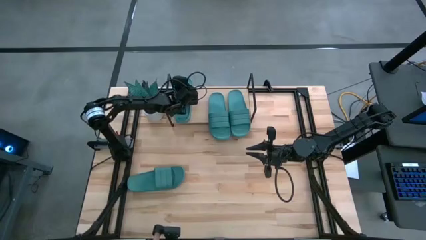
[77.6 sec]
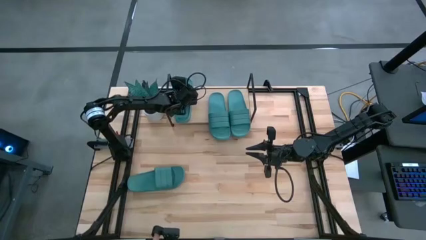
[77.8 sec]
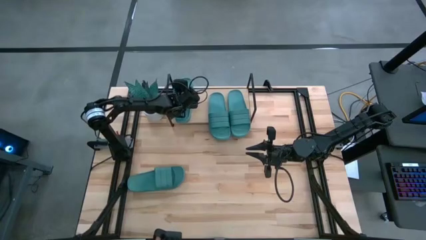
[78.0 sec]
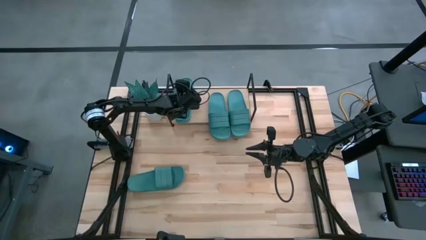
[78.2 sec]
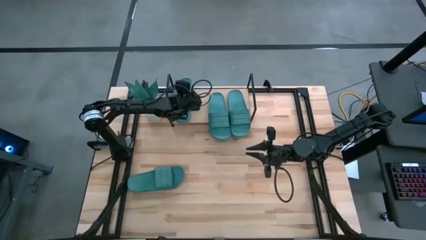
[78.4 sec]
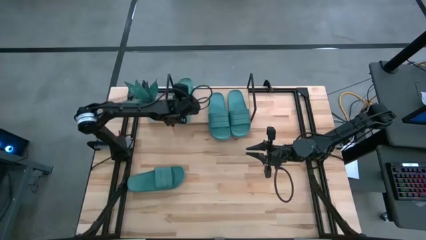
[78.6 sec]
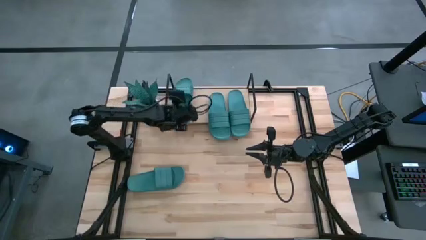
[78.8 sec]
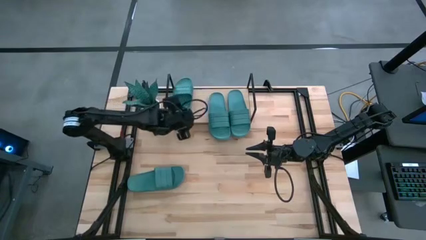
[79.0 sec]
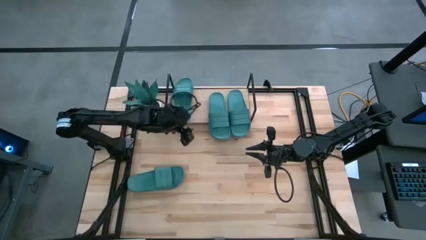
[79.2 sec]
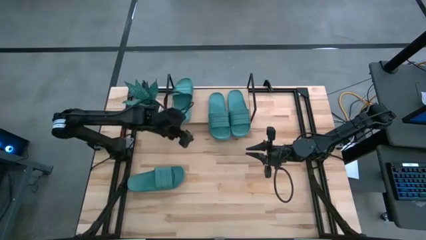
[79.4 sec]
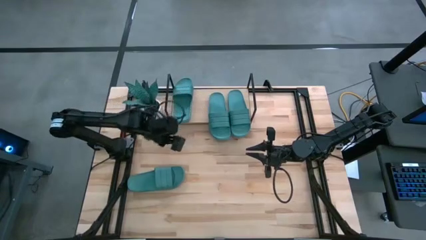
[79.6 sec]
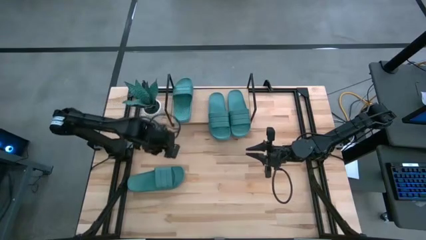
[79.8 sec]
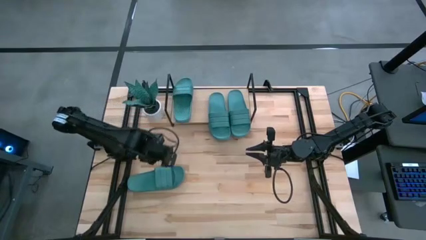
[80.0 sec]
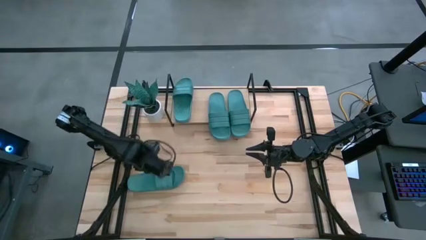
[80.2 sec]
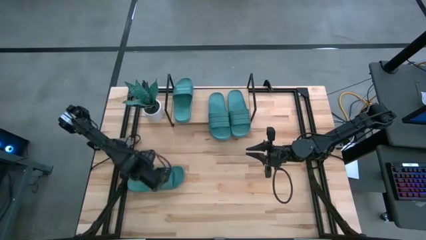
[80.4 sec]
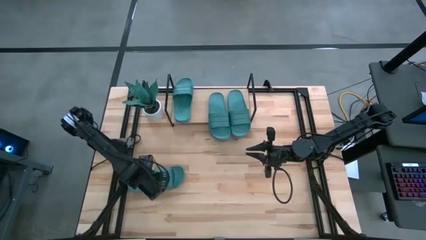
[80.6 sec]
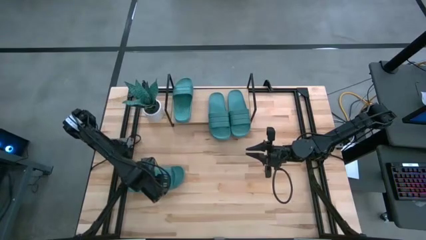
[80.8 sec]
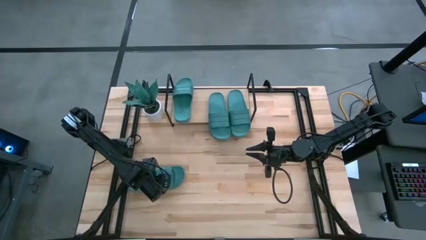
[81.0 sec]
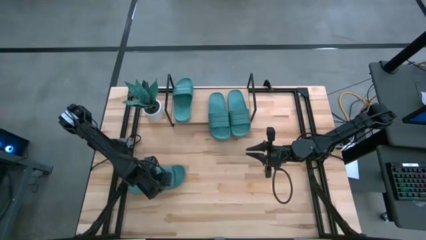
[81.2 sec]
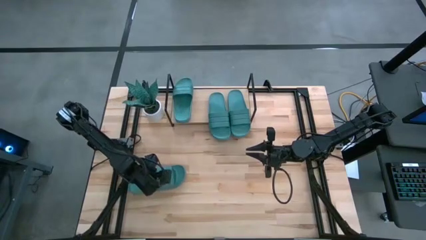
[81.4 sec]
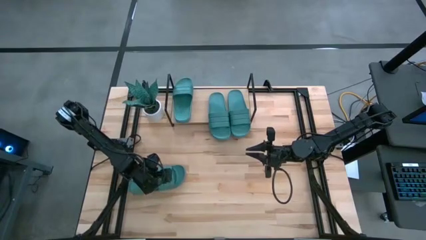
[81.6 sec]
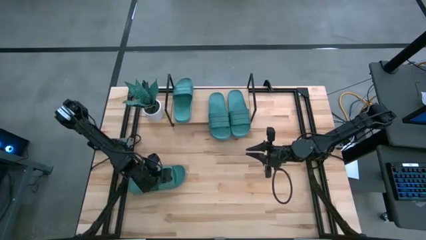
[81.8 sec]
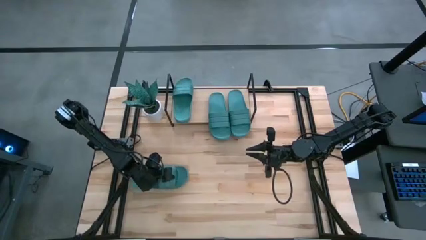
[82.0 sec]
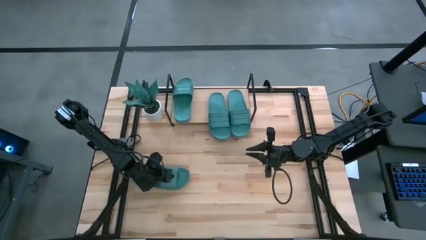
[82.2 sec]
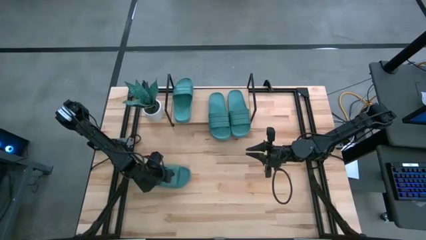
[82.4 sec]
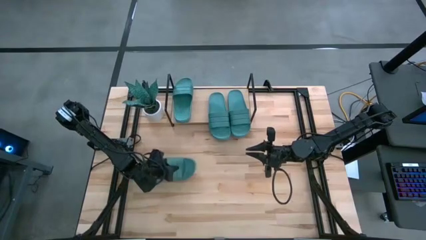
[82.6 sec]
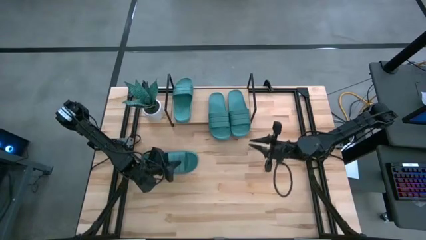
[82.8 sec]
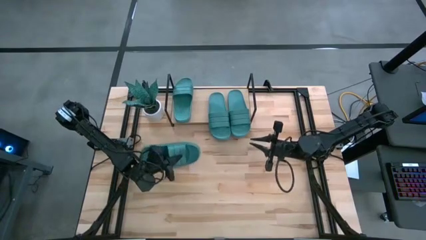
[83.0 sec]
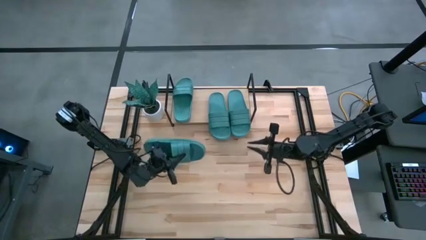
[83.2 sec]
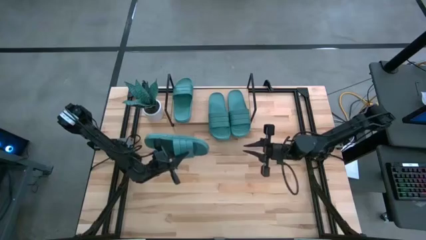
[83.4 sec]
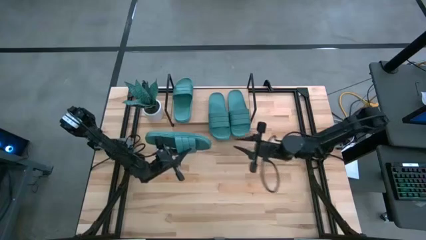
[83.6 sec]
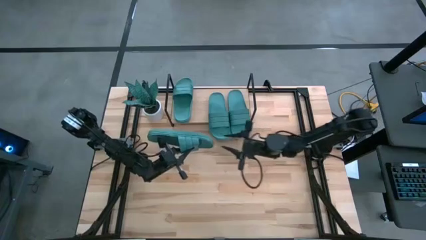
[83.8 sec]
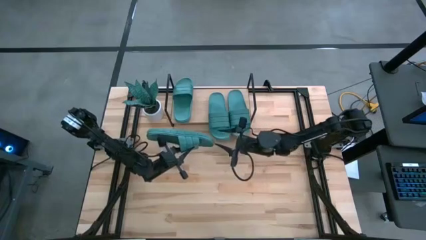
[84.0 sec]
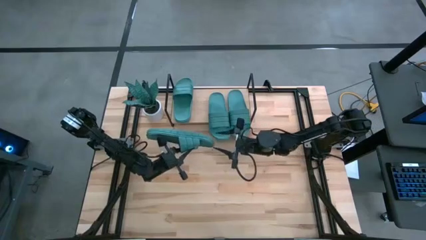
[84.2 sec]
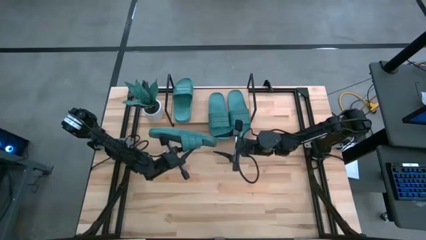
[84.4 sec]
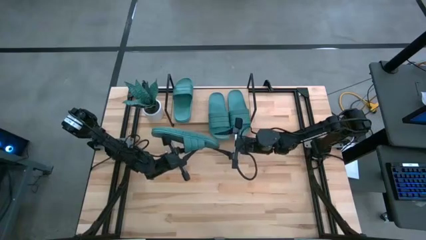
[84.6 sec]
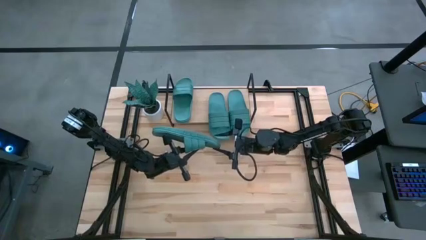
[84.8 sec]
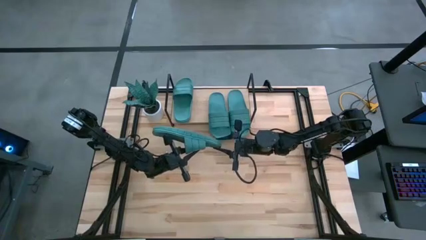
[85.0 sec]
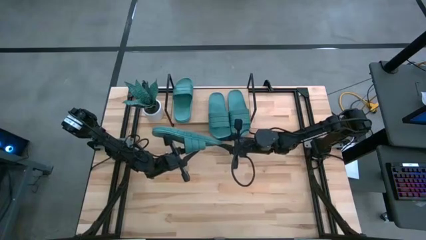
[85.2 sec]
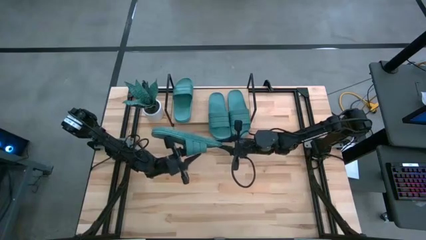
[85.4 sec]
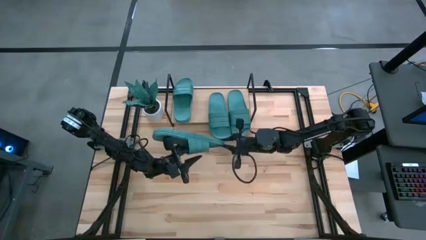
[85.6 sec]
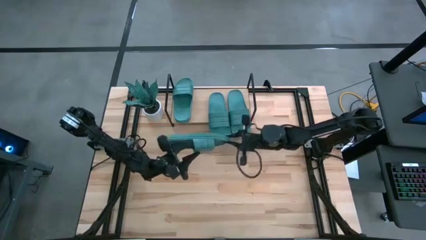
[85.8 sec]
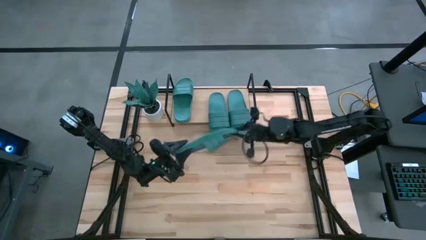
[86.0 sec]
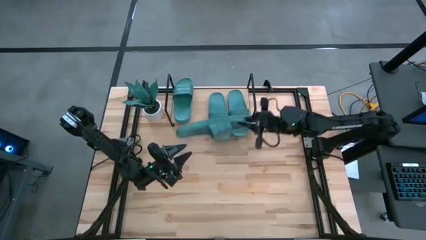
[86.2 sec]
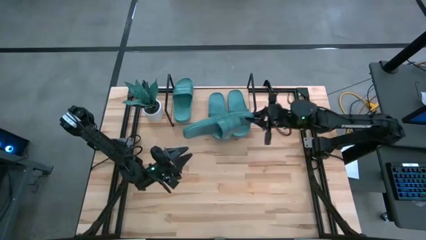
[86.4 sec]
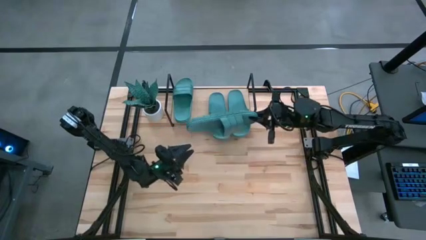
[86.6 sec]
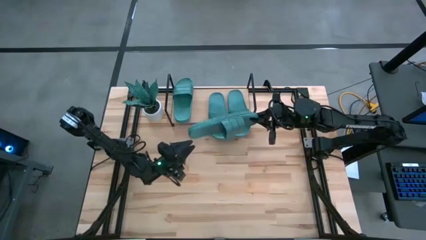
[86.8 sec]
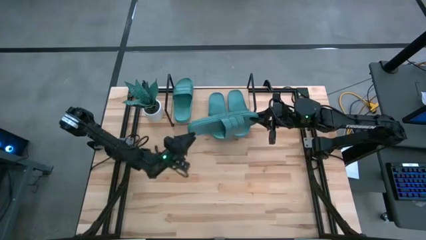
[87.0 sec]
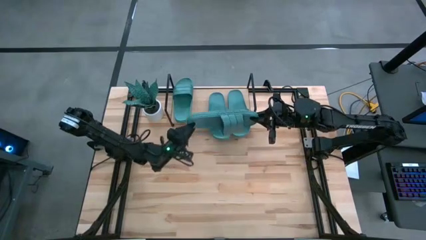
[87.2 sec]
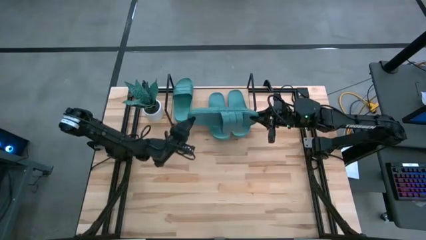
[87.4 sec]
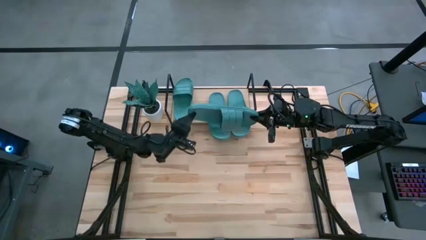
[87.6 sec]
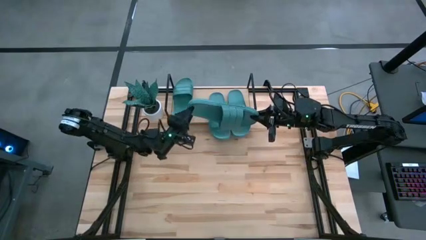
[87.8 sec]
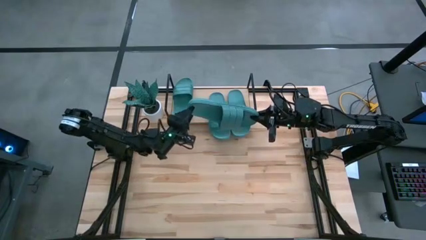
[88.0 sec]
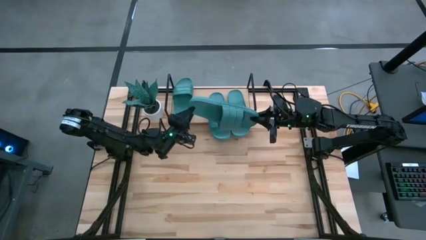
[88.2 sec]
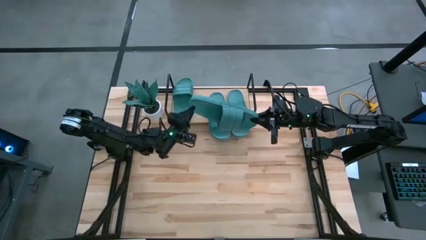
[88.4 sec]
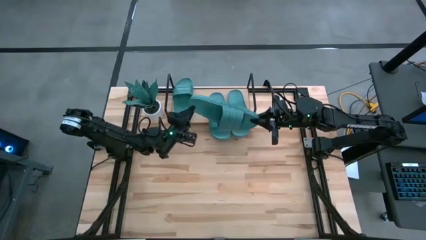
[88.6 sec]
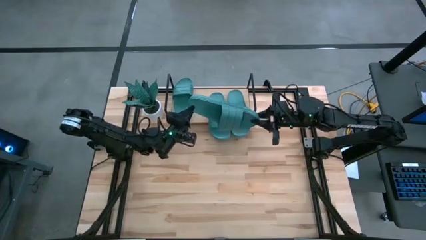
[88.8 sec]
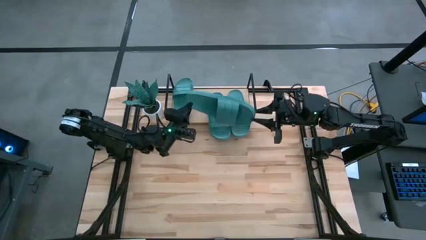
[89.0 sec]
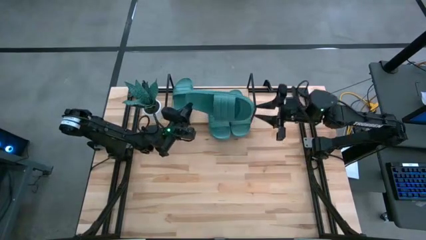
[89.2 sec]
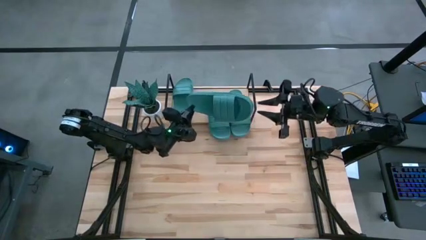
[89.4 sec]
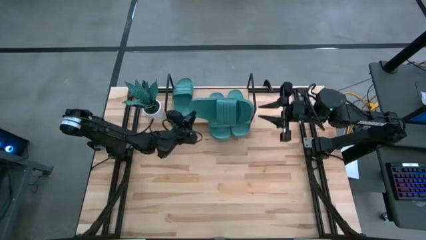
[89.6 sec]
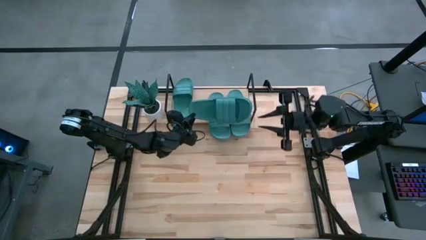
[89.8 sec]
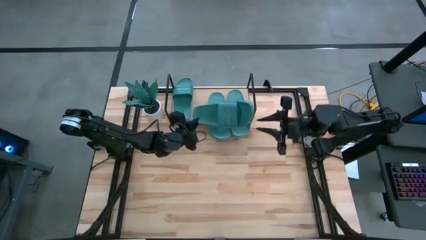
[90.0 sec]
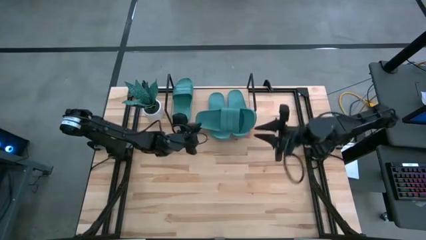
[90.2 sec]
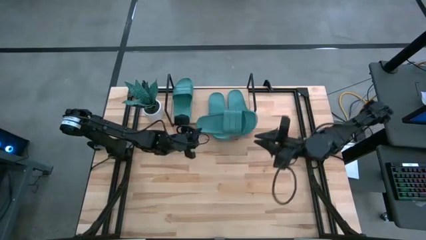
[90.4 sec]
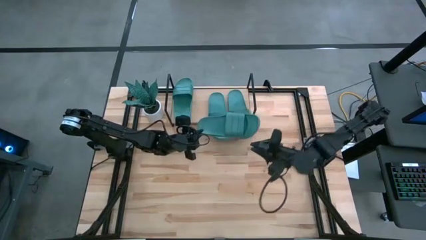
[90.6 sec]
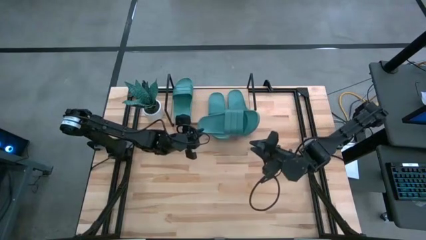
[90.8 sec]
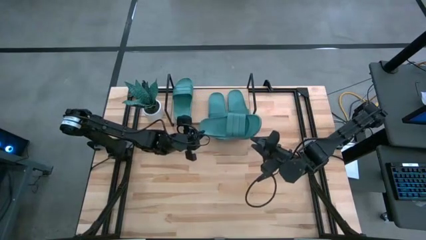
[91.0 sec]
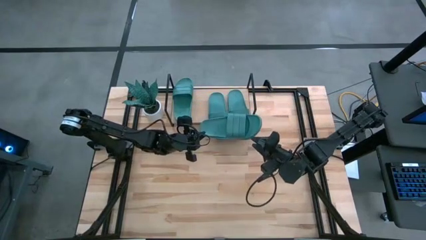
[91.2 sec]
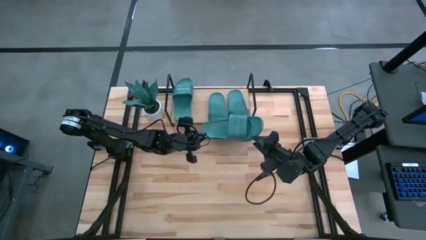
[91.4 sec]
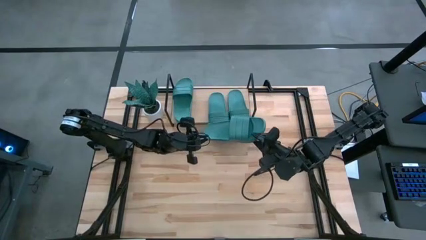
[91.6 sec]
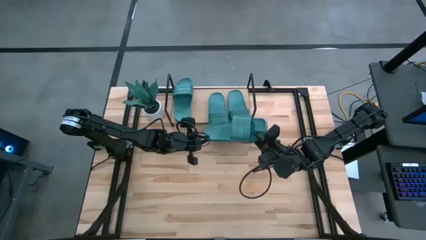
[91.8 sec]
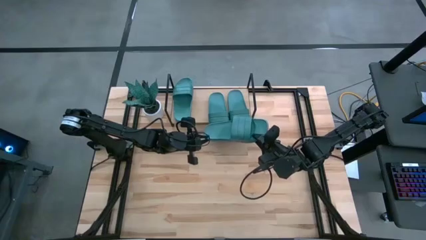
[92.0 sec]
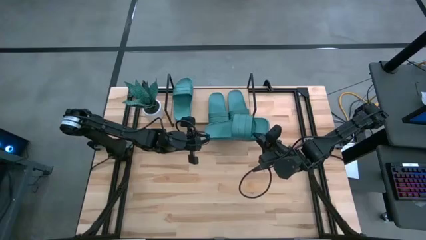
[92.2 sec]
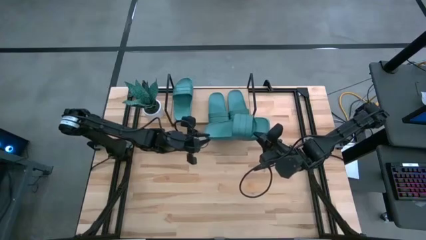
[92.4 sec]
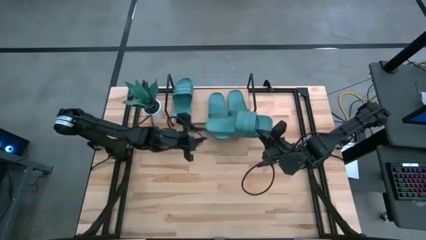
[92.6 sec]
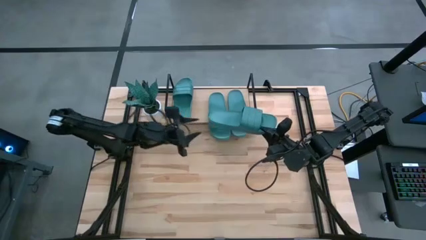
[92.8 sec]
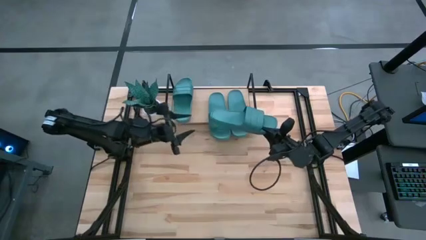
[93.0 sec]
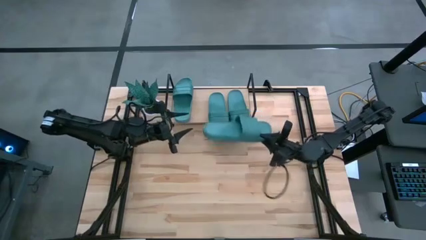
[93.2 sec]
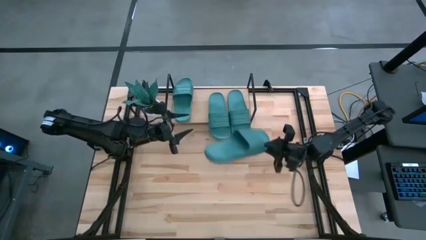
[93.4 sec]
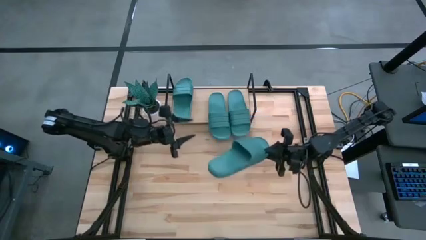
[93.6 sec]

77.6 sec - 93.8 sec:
Task: Pick and place slides into the shelf
Put the green slipper on the shelf
